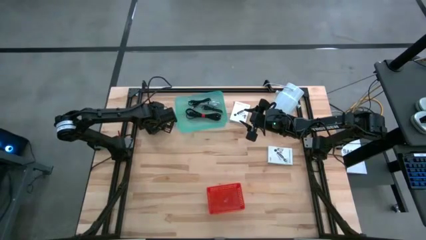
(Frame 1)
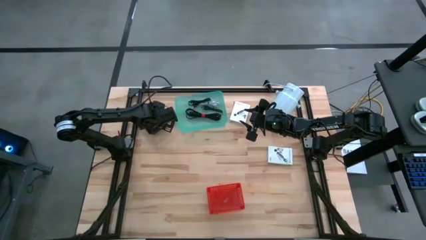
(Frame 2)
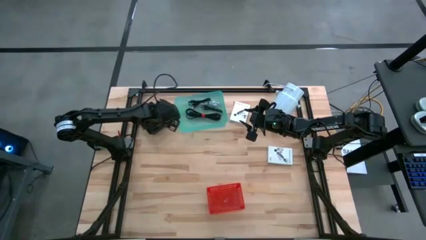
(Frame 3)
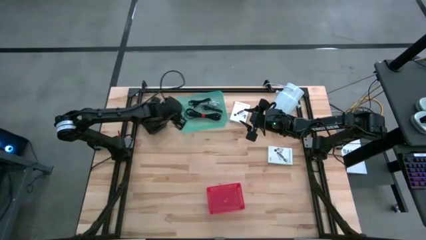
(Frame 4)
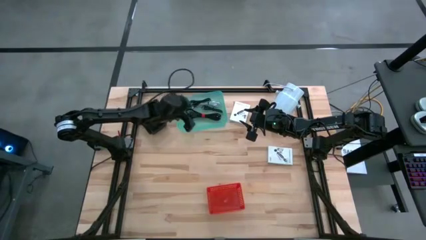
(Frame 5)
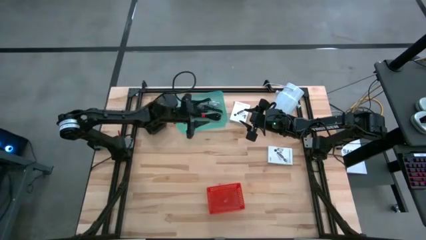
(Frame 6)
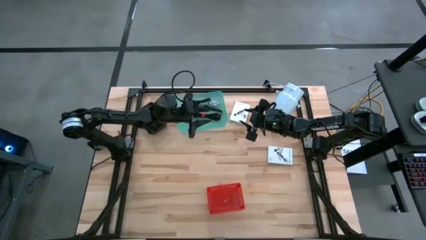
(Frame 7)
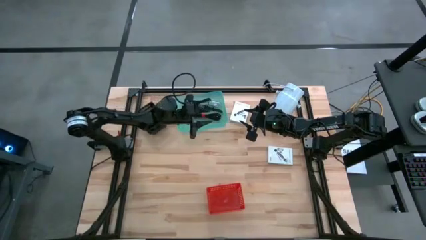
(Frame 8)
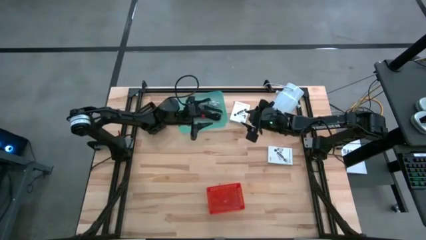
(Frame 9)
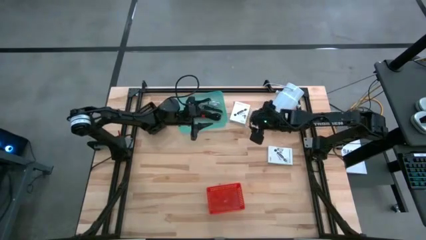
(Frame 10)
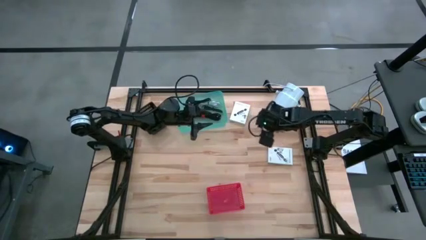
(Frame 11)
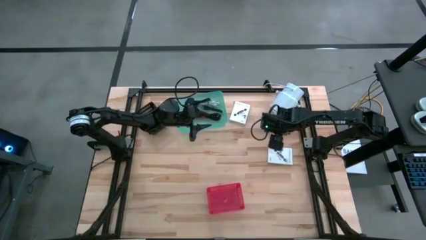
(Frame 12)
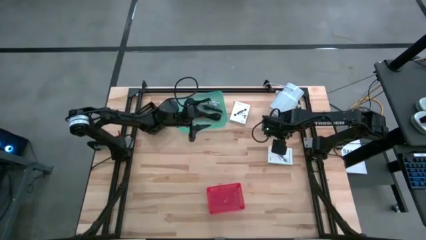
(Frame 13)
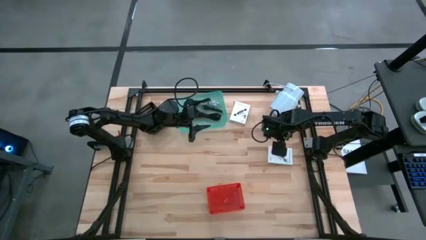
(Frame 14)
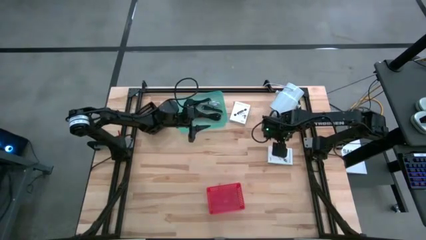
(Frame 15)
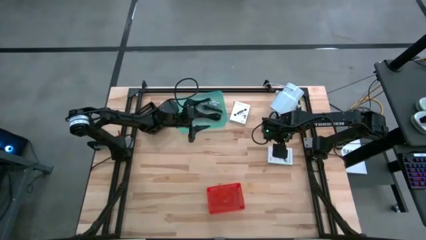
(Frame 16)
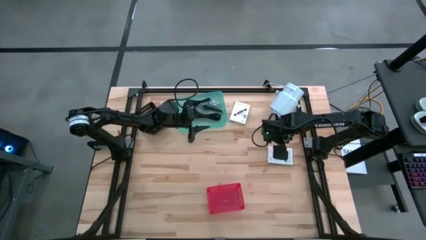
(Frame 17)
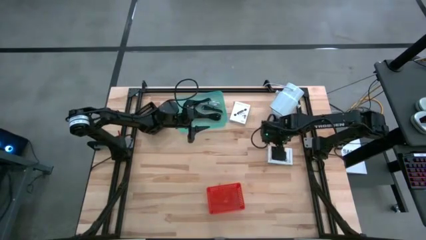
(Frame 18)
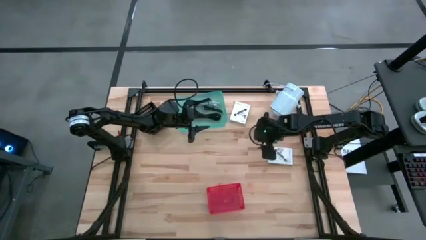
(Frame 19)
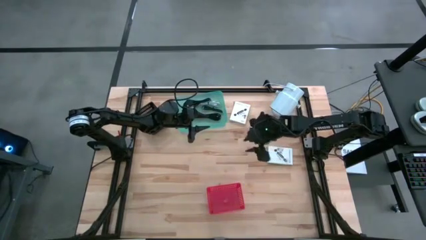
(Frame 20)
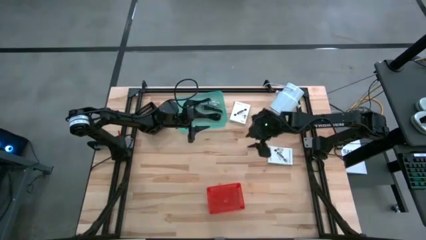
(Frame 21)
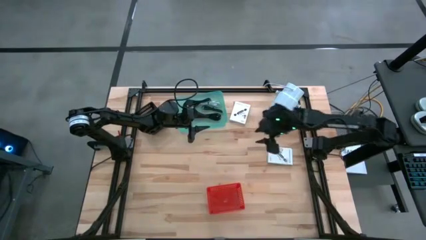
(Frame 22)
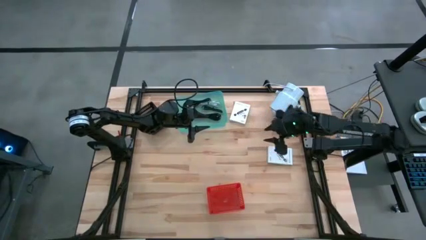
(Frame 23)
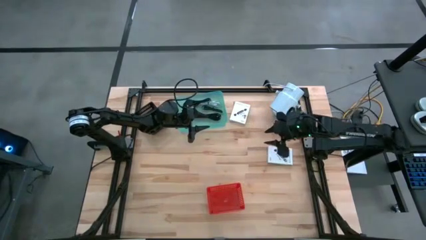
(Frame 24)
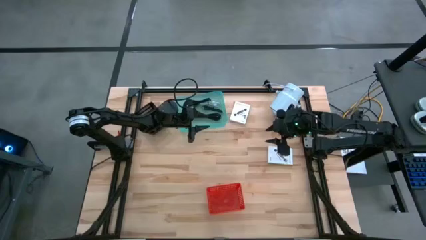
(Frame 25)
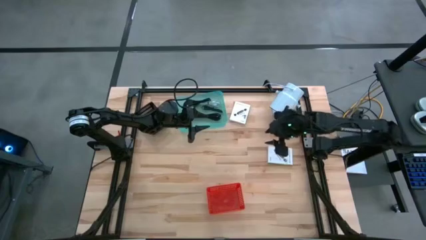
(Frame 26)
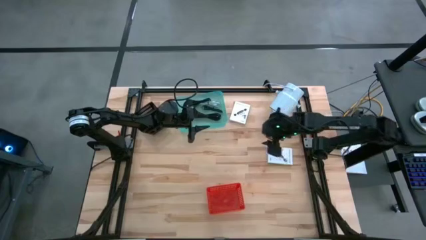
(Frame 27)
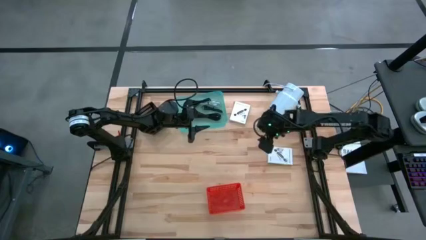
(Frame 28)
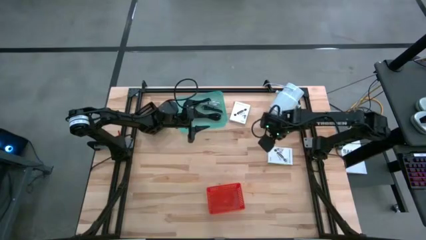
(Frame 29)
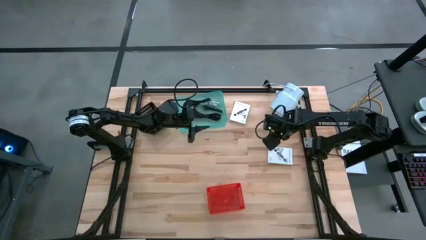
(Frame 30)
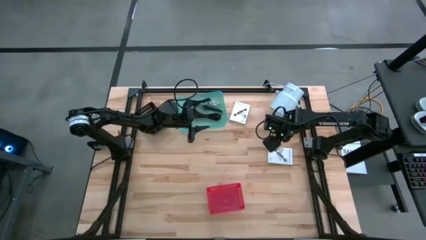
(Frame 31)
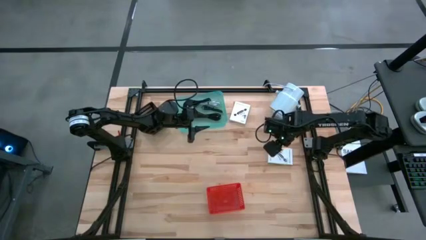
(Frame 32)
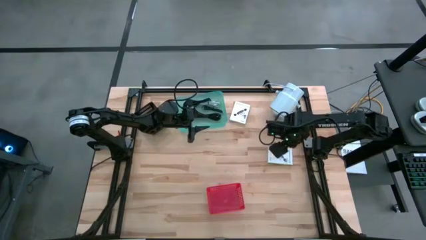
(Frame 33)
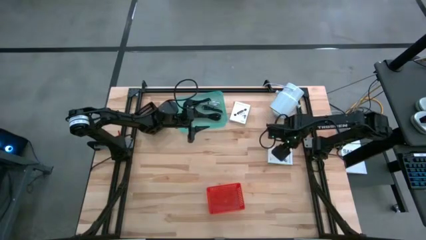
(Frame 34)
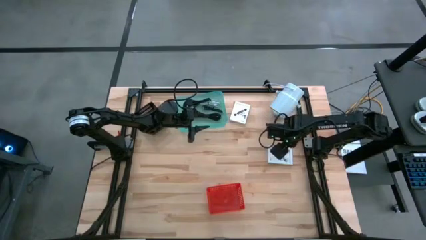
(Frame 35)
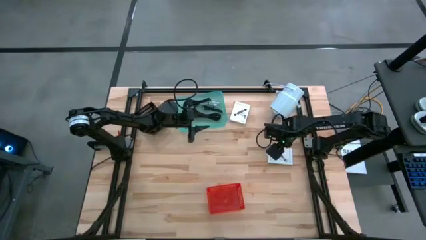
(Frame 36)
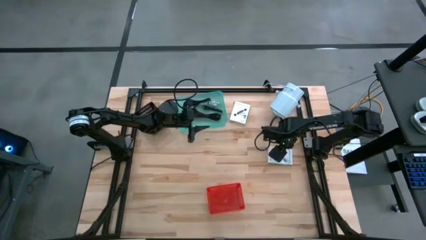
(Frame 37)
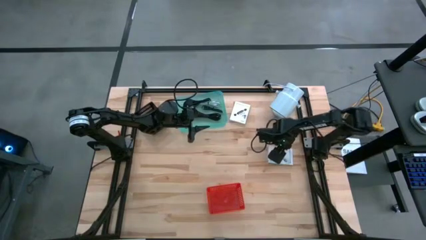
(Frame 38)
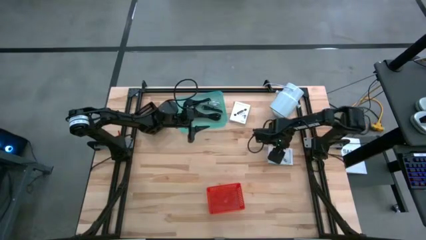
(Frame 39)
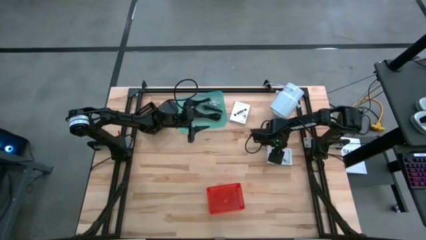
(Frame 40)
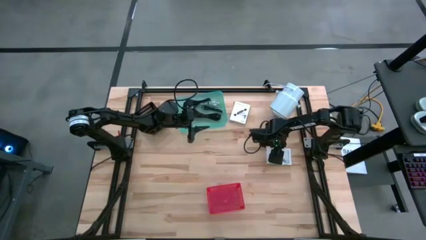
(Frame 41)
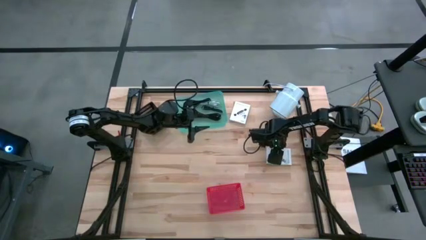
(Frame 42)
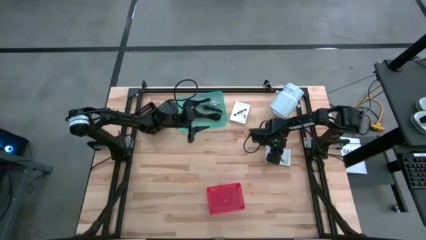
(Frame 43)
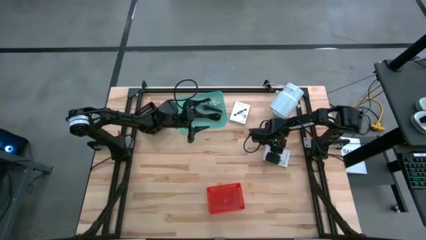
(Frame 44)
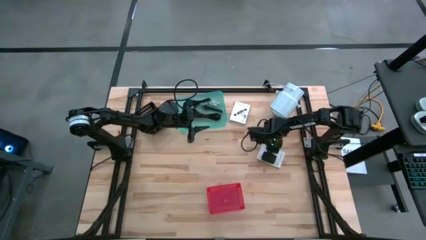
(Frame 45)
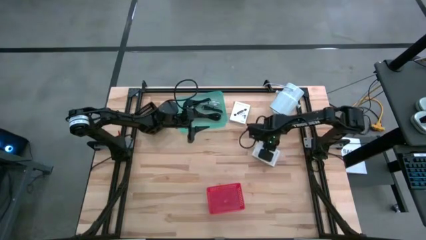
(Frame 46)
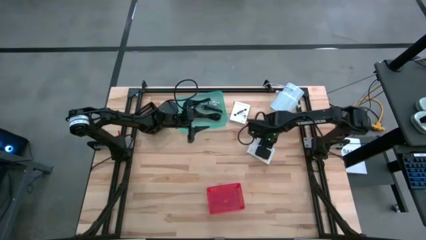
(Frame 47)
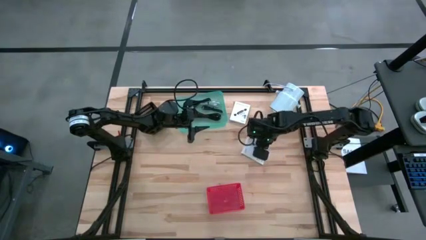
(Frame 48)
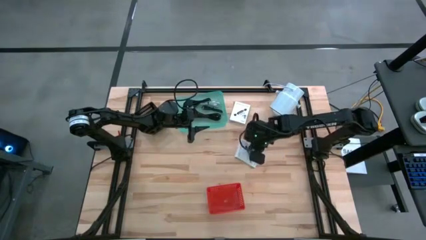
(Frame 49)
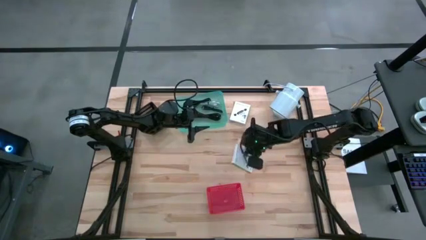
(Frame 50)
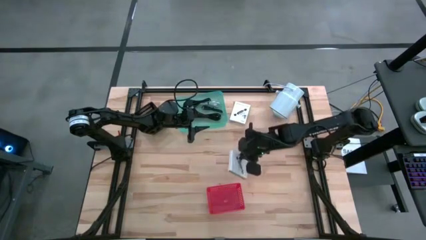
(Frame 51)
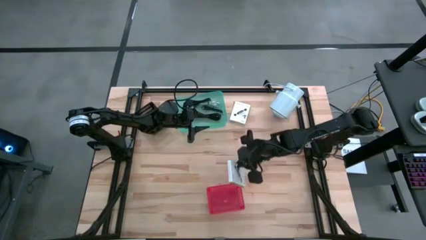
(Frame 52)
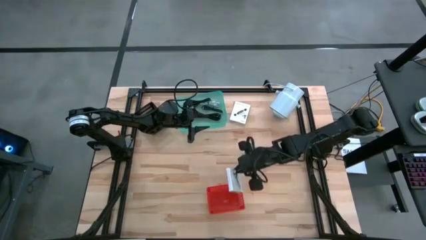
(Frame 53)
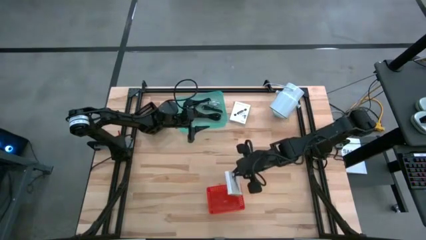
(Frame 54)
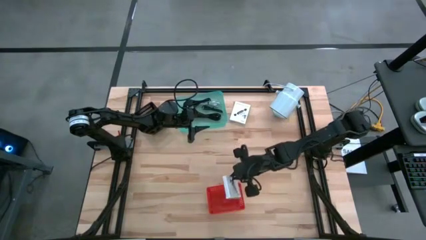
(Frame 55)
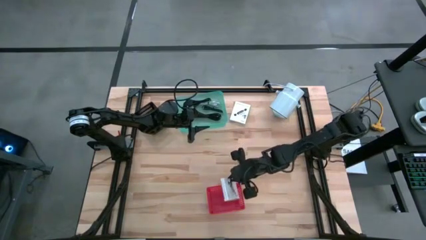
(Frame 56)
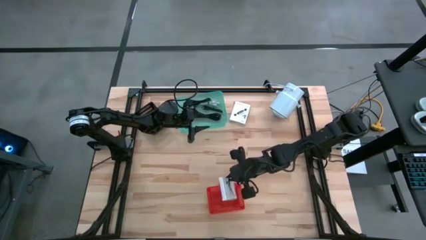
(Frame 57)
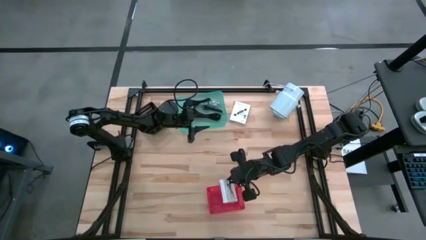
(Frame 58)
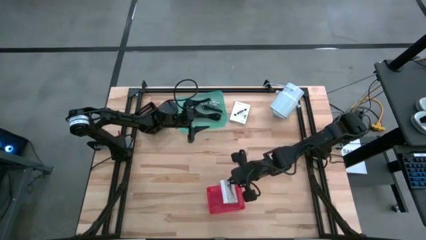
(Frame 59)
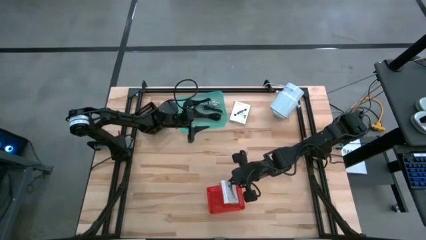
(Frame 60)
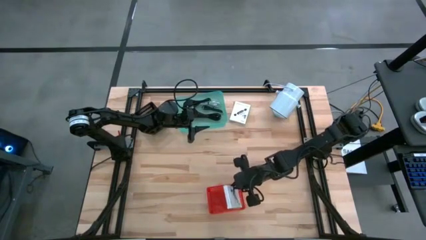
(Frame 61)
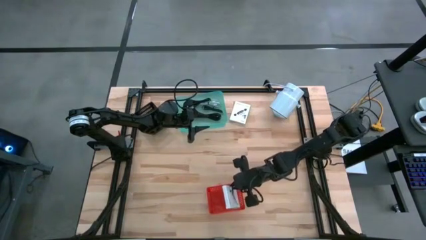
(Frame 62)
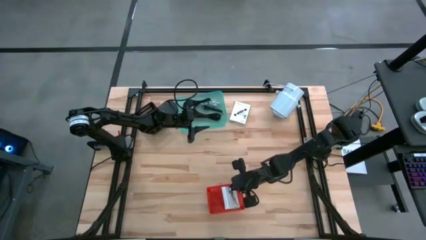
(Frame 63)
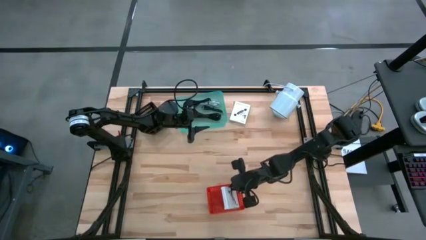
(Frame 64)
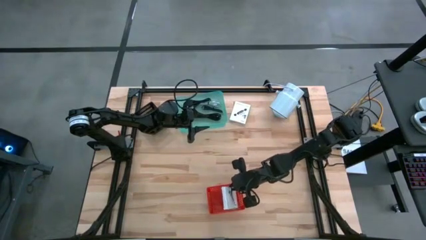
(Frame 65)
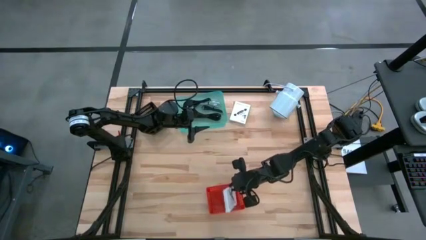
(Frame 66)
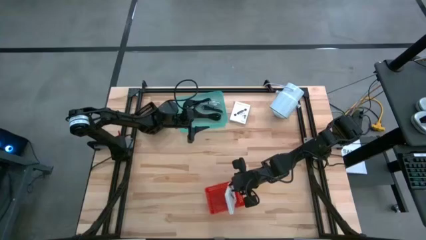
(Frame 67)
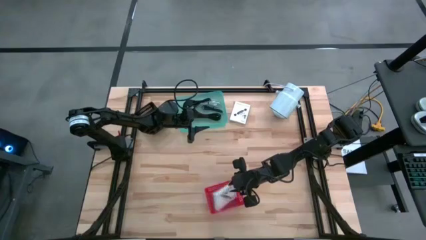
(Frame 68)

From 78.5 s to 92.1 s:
Task: Pick and place items into bin
Put the bottom white card reader box into the red bin
